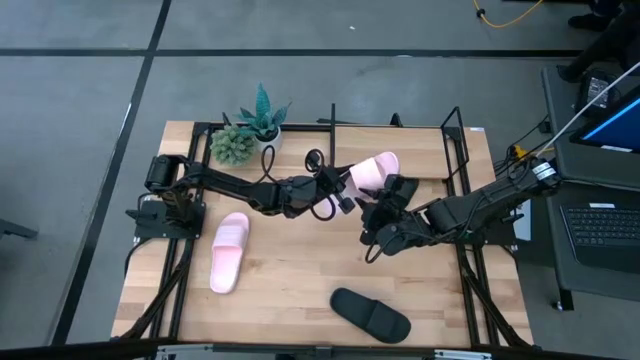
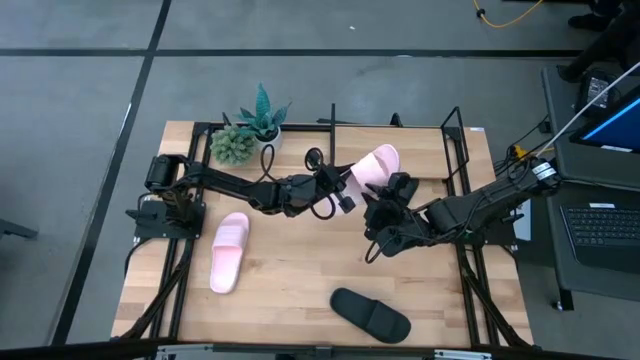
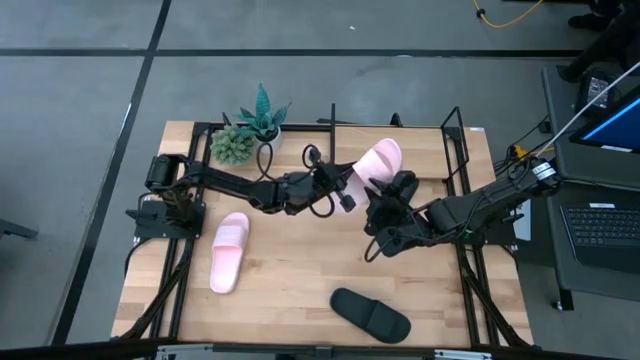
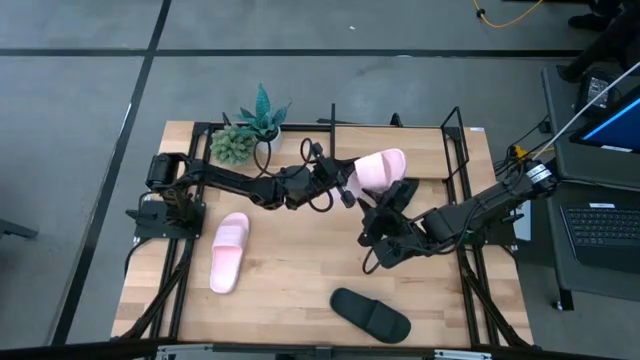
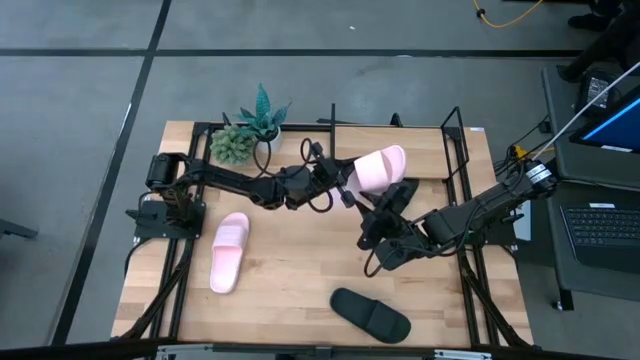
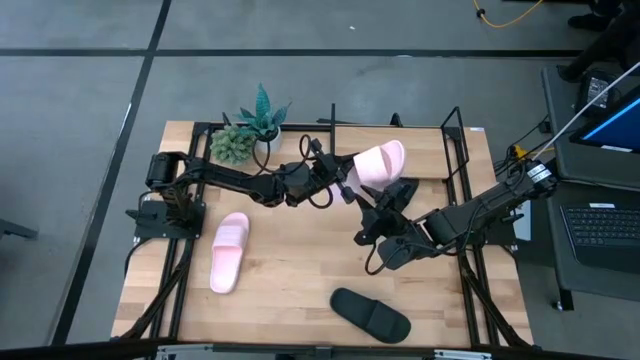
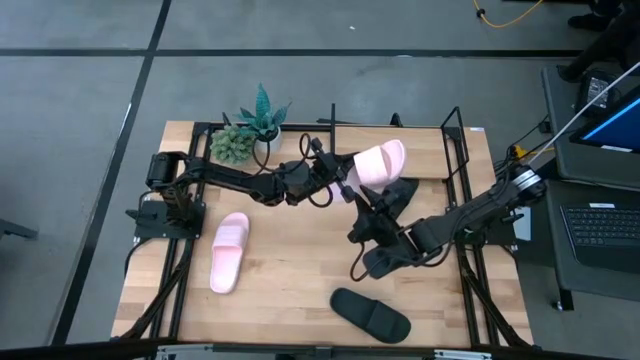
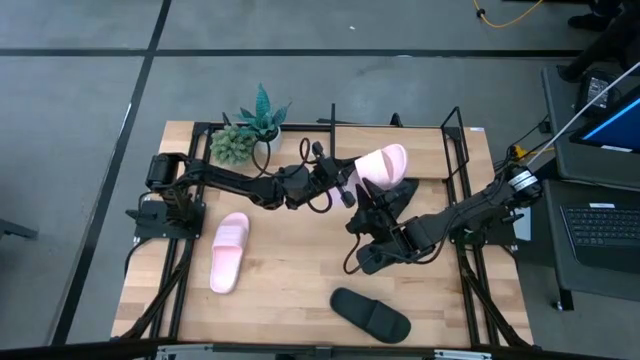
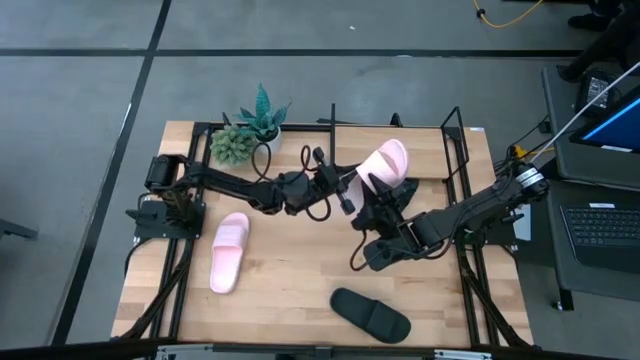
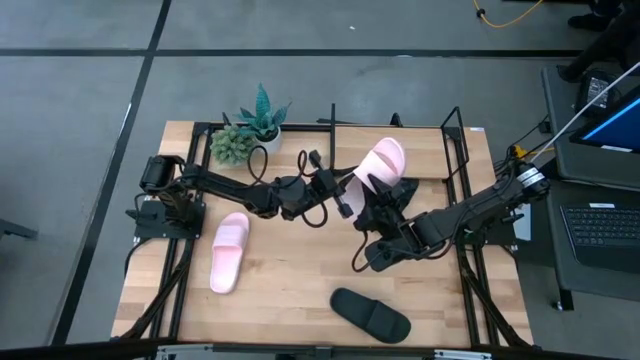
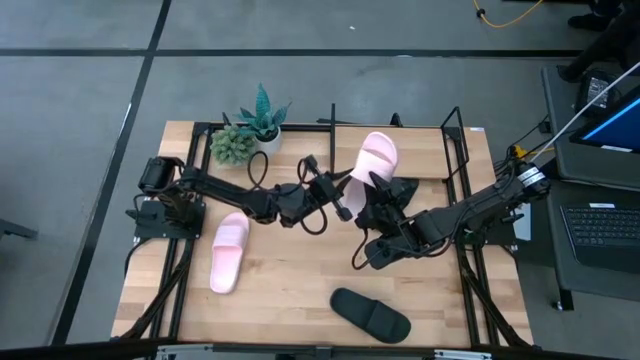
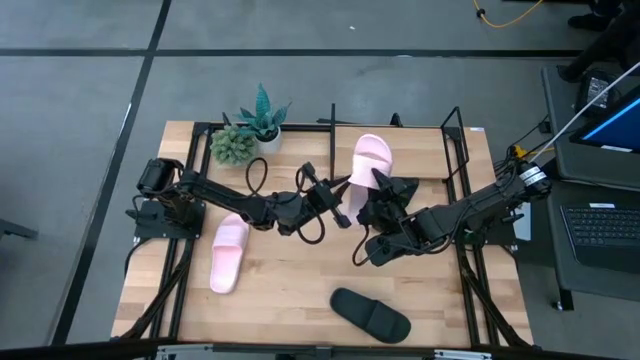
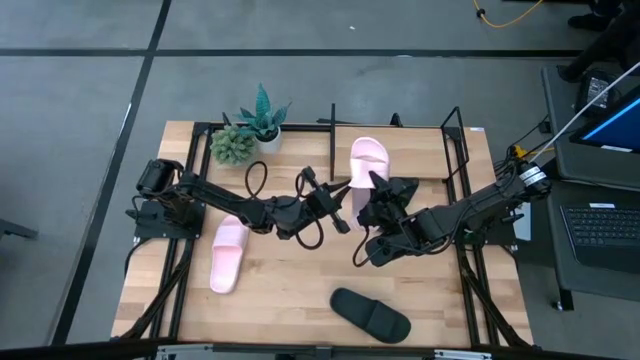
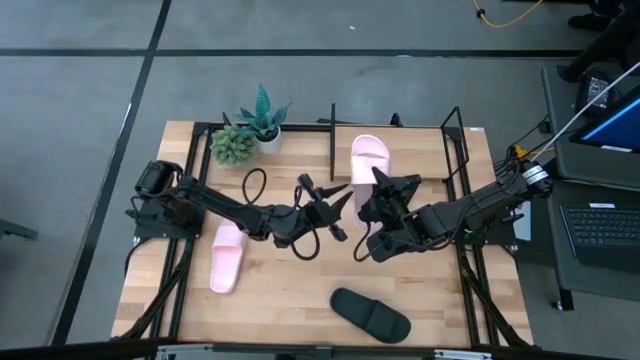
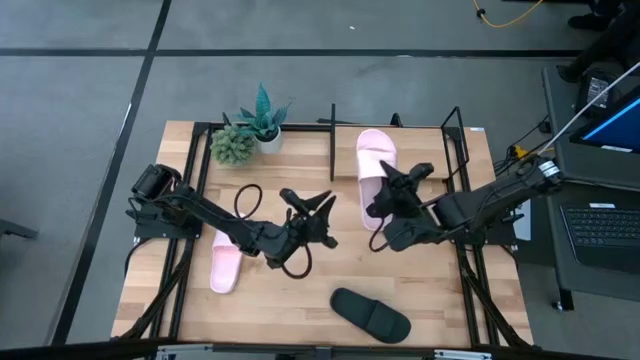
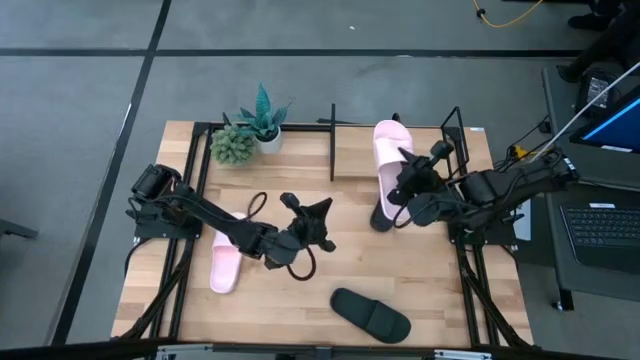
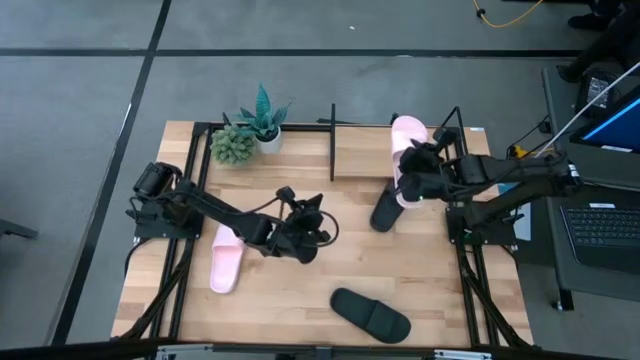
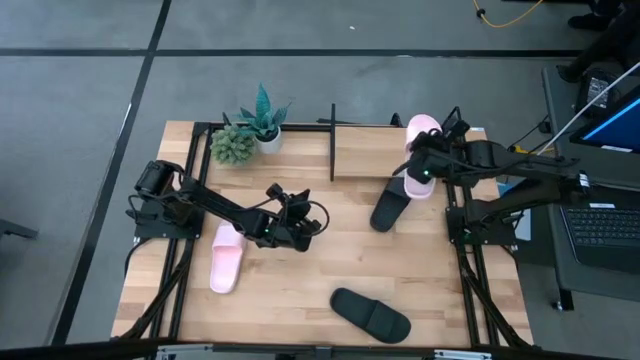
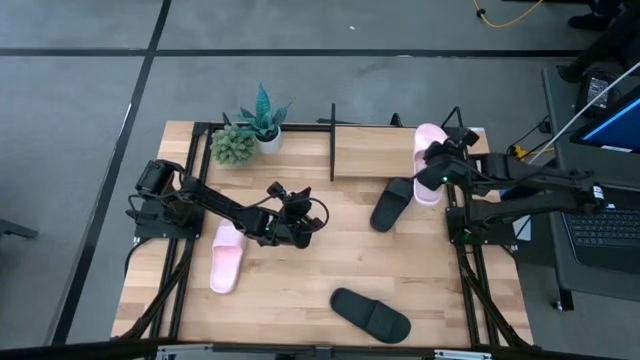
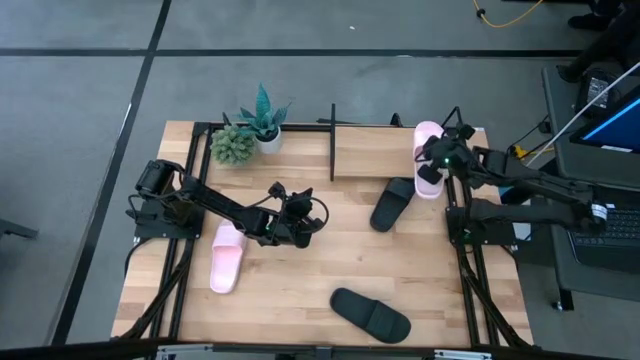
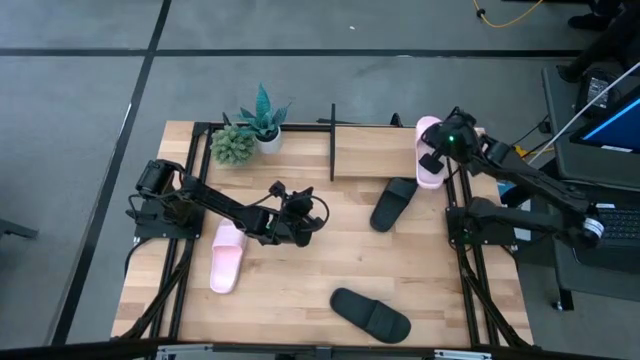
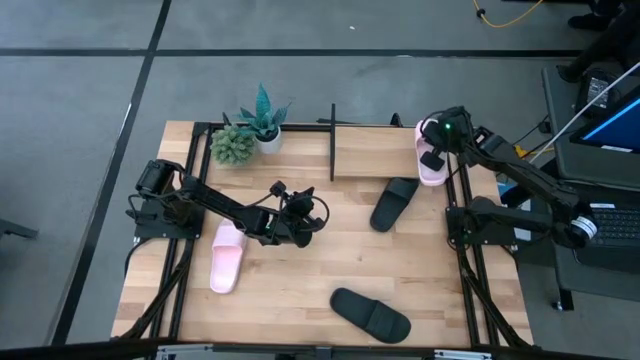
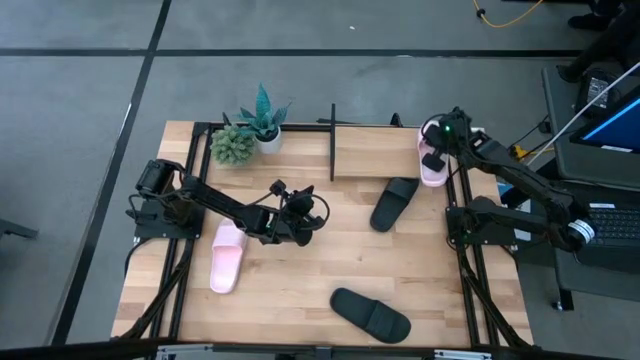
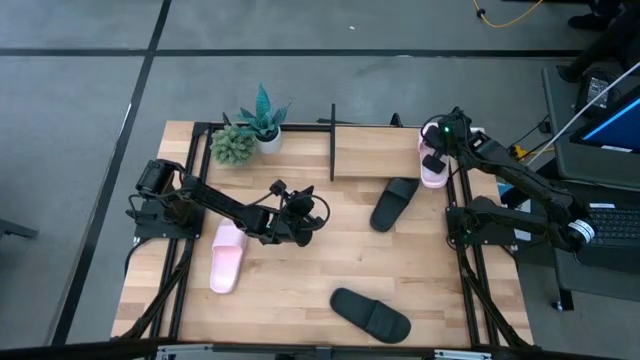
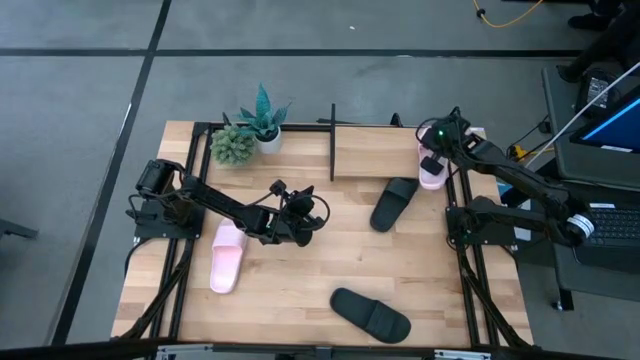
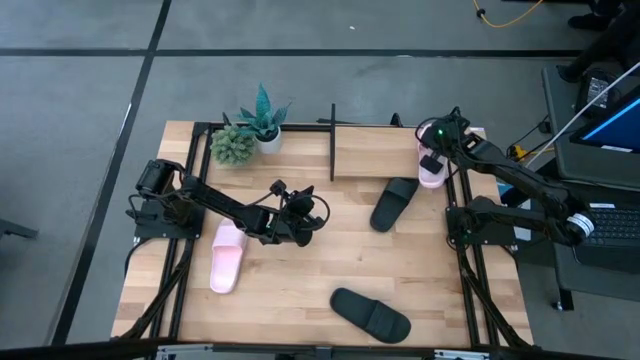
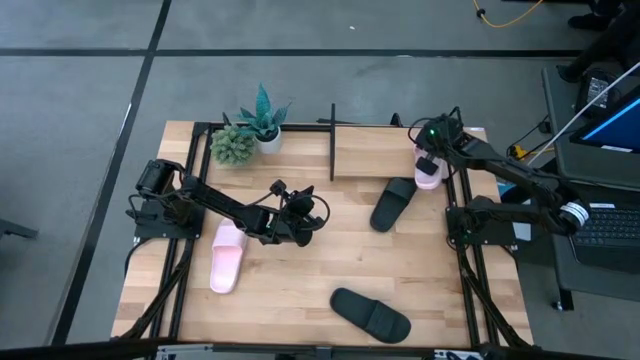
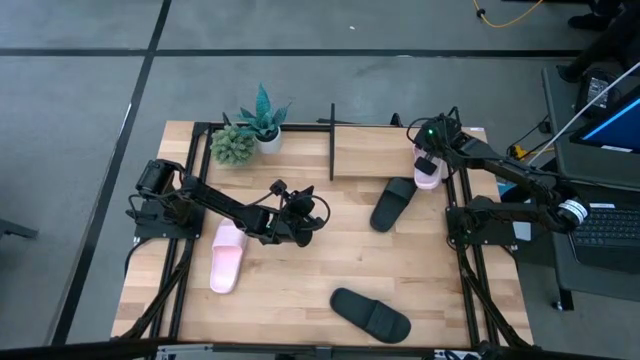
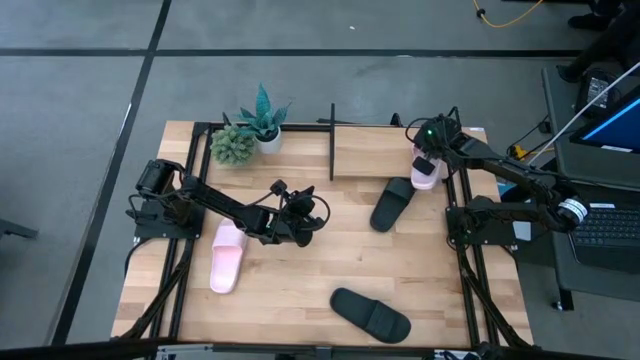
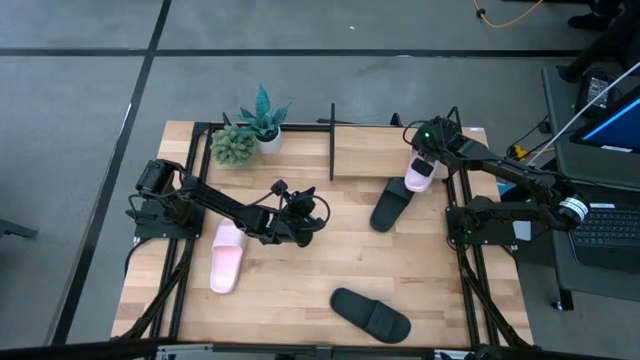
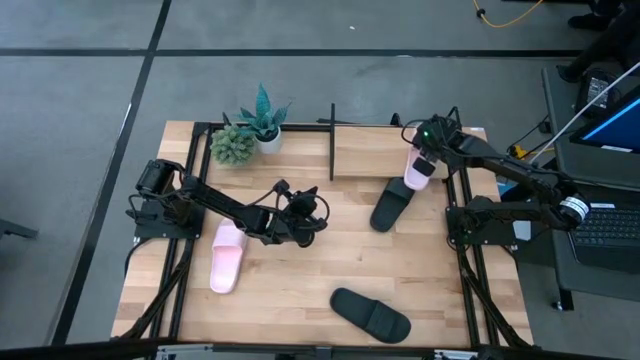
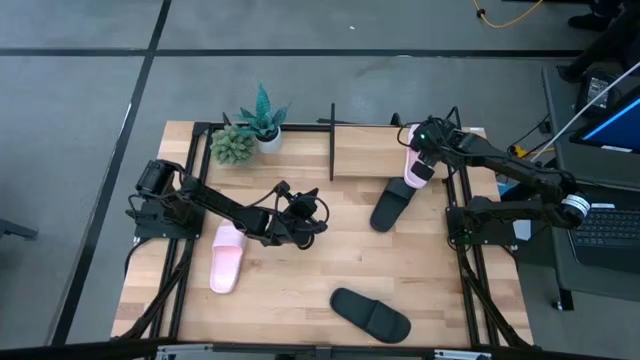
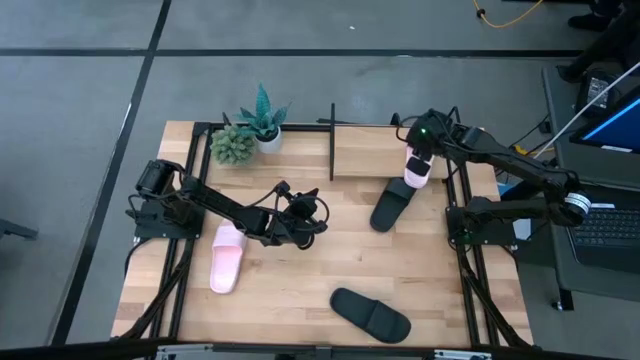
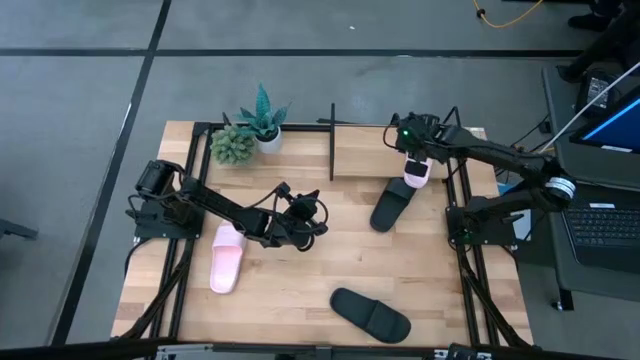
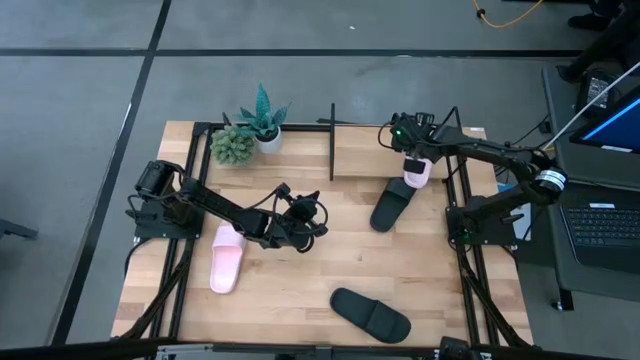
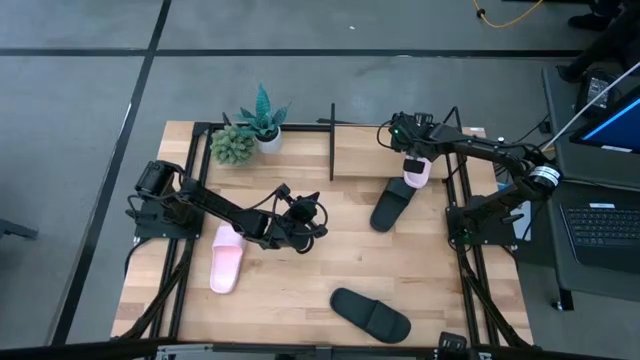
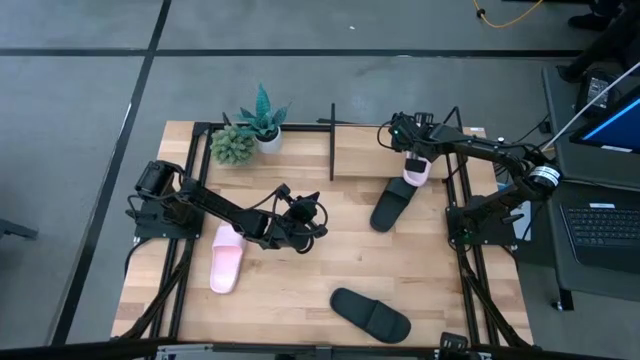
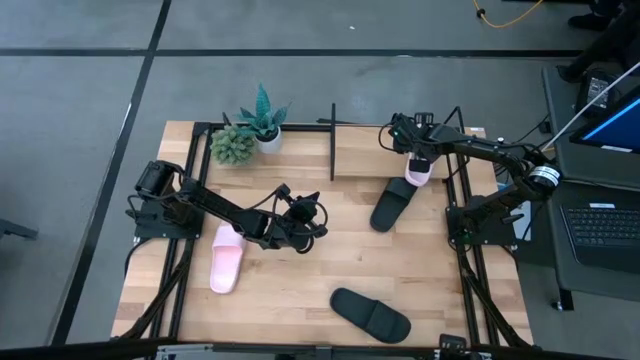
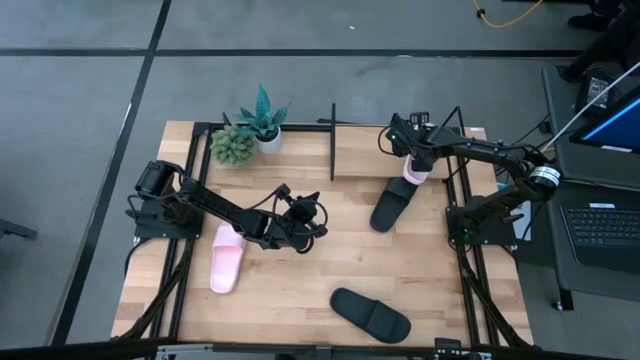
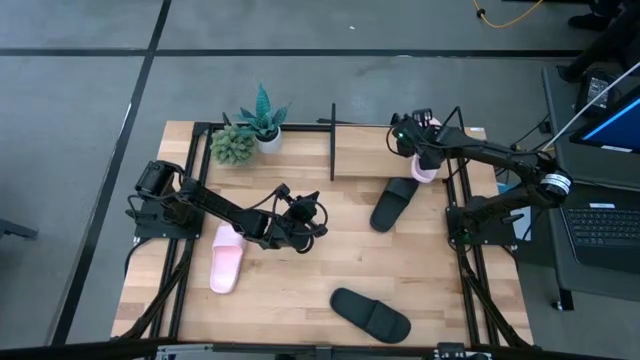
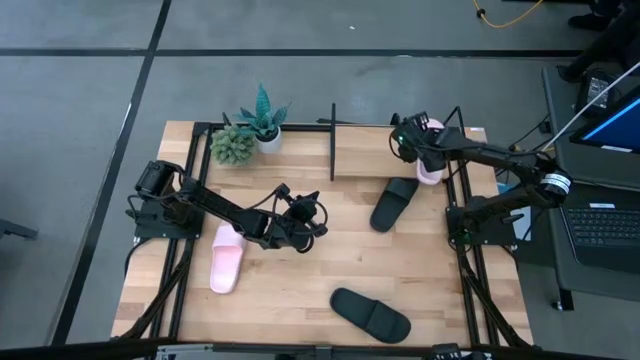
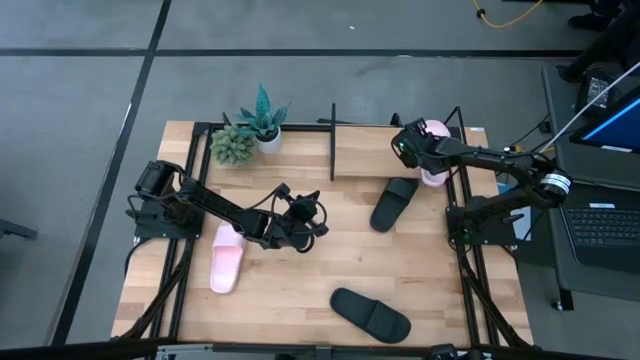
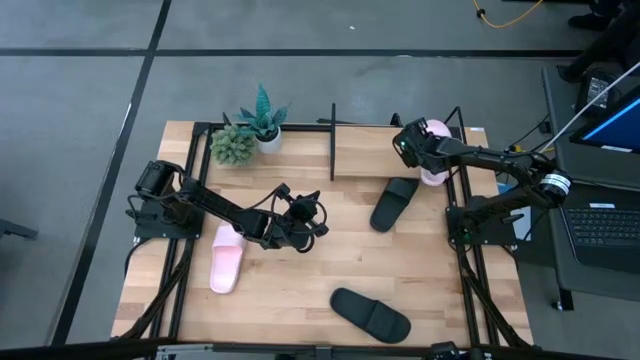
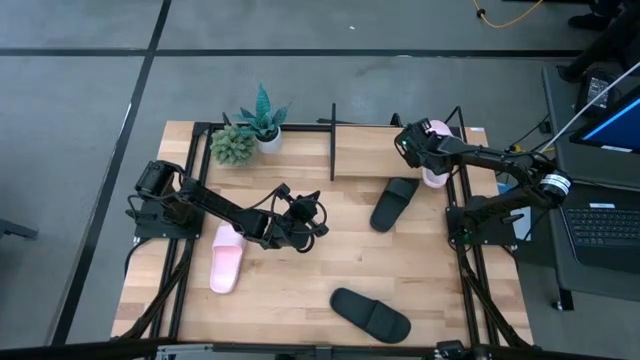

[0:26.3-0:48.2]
Task: Pick and place slides into the shelf
Put the top pink slide on the shelf
